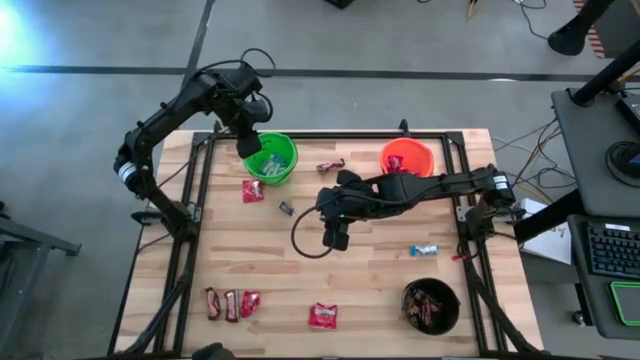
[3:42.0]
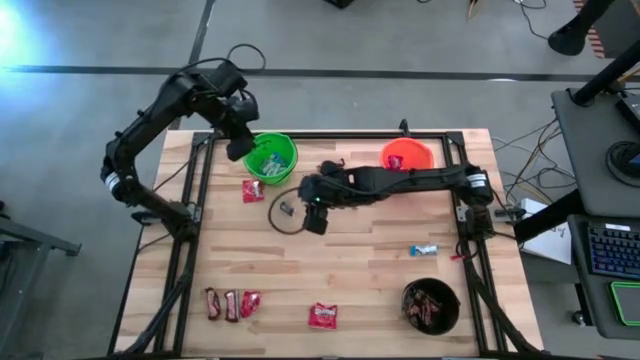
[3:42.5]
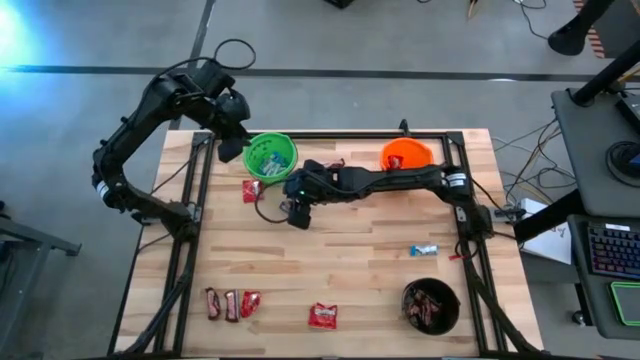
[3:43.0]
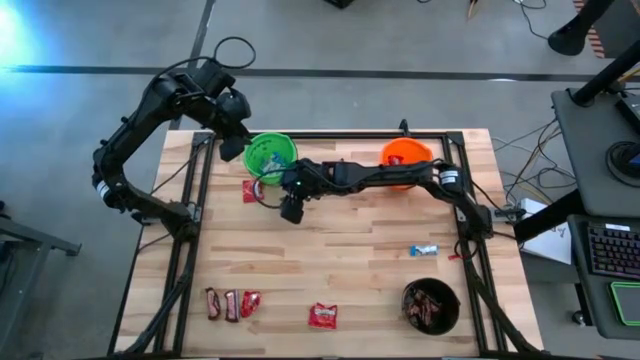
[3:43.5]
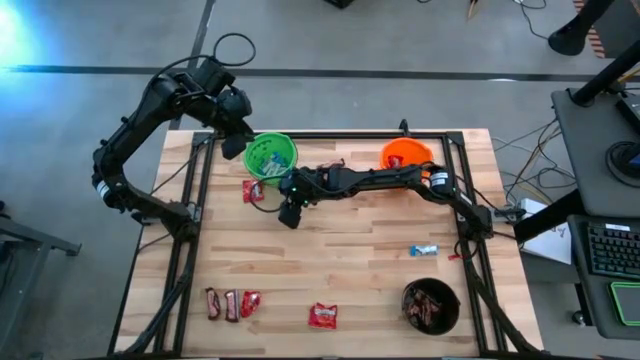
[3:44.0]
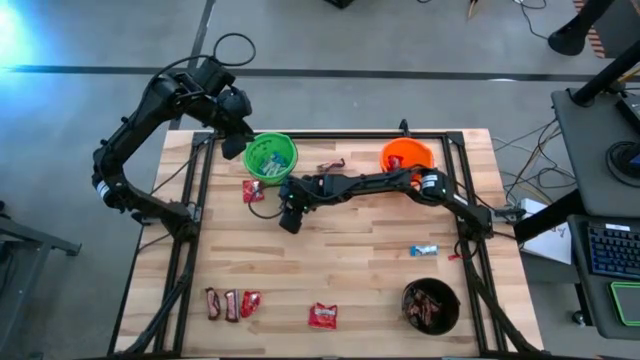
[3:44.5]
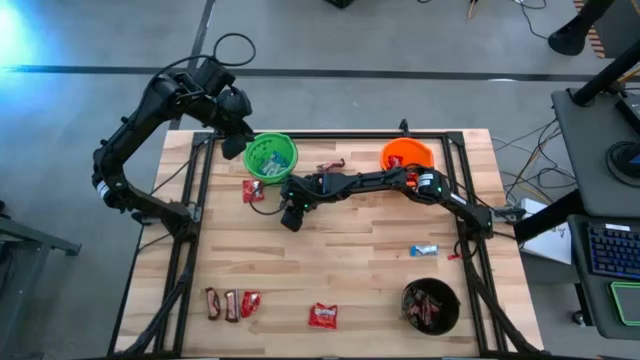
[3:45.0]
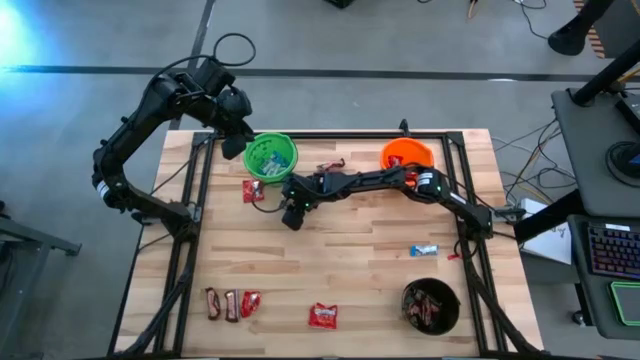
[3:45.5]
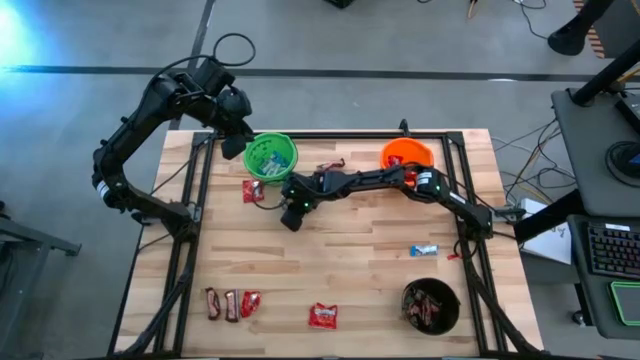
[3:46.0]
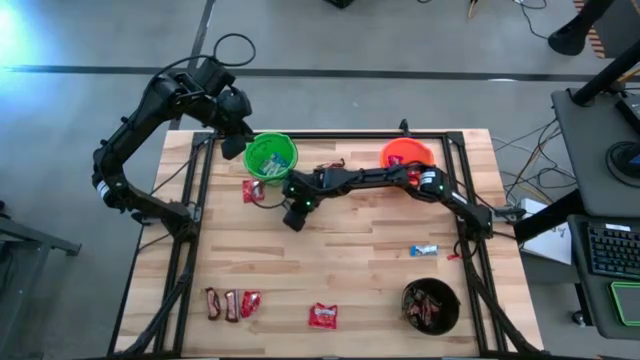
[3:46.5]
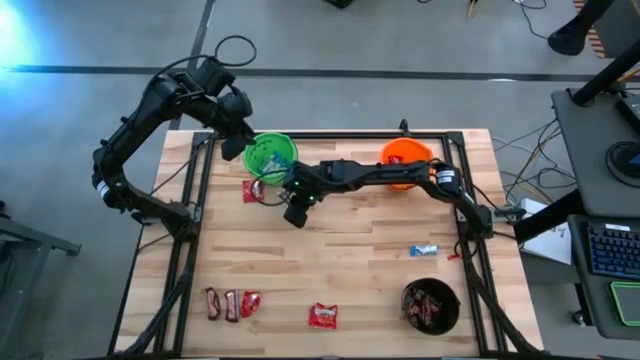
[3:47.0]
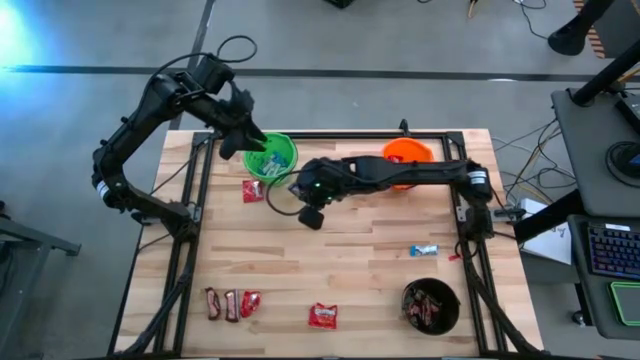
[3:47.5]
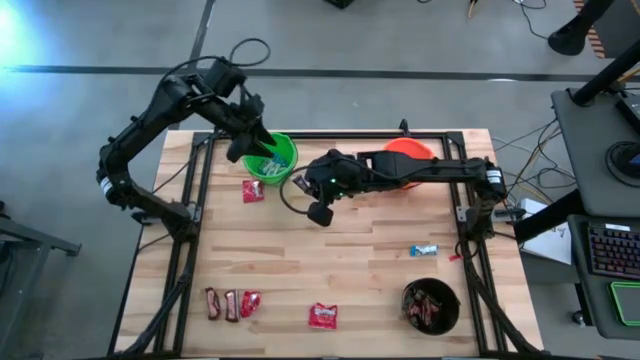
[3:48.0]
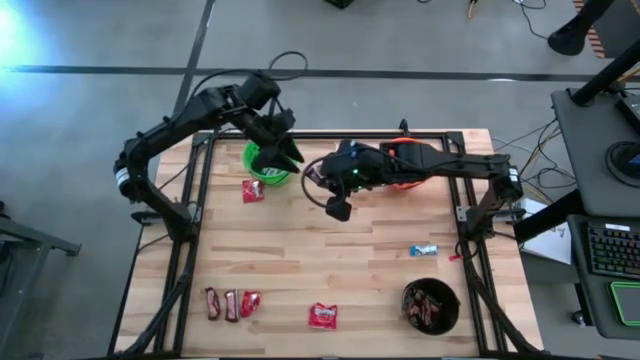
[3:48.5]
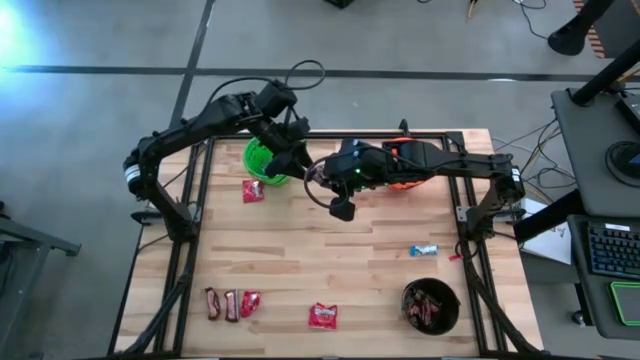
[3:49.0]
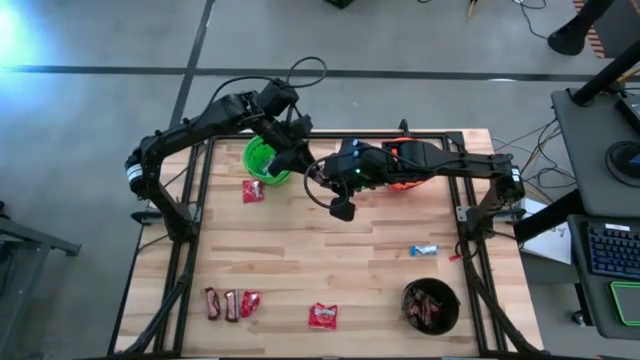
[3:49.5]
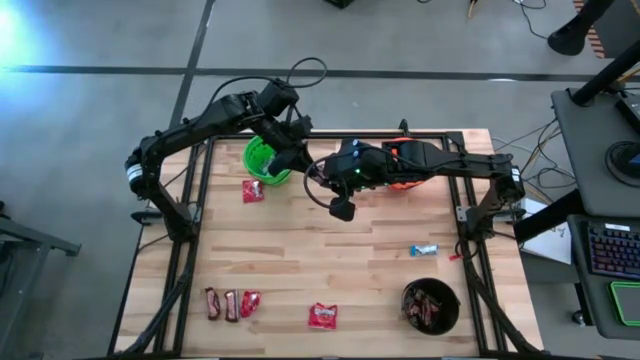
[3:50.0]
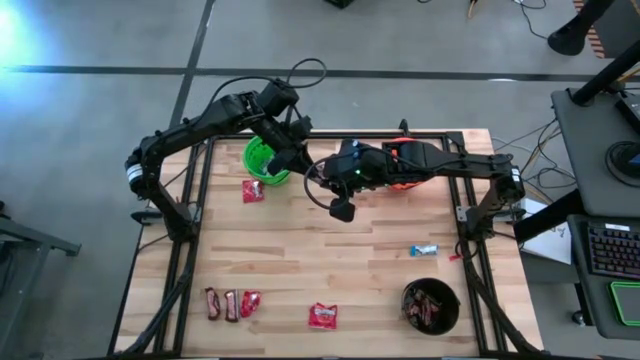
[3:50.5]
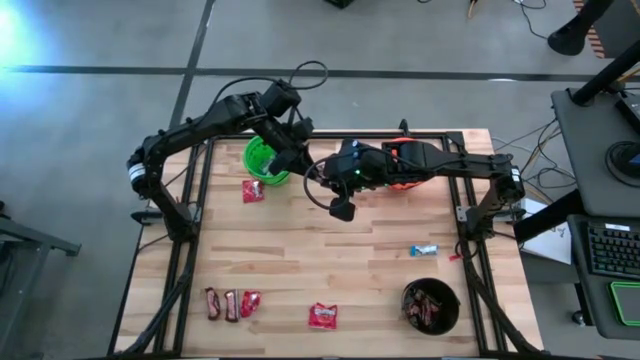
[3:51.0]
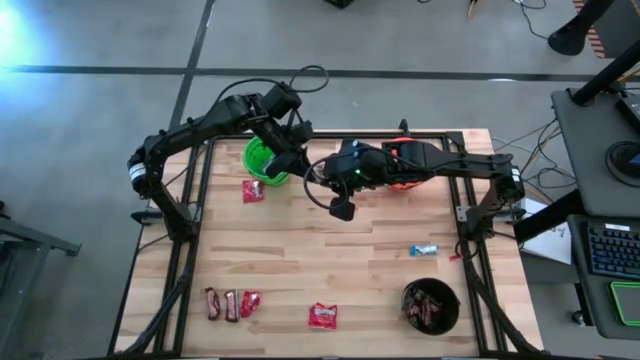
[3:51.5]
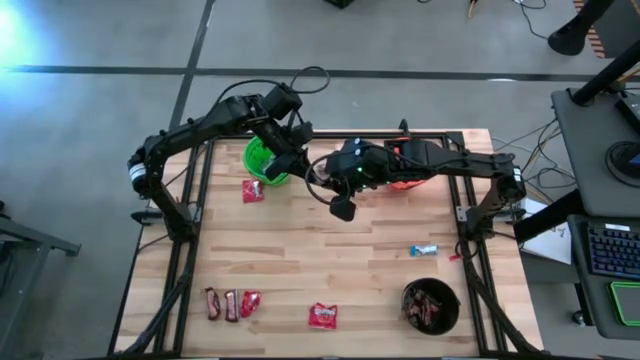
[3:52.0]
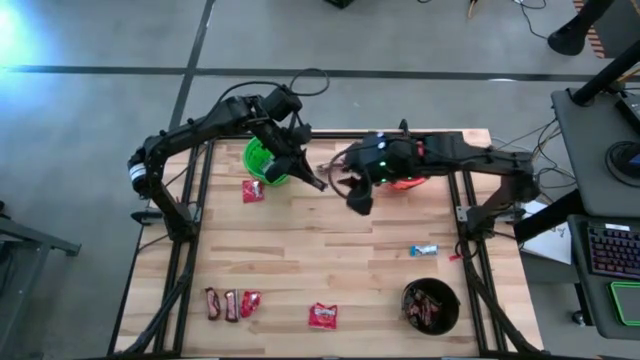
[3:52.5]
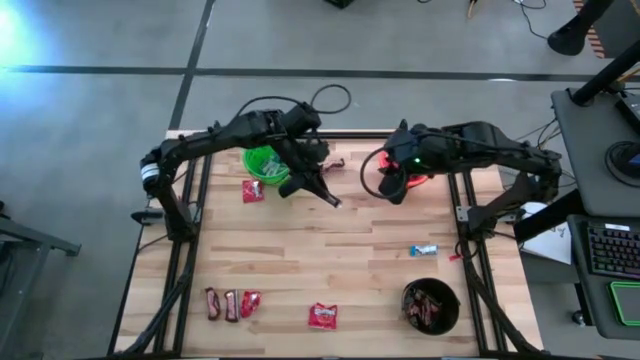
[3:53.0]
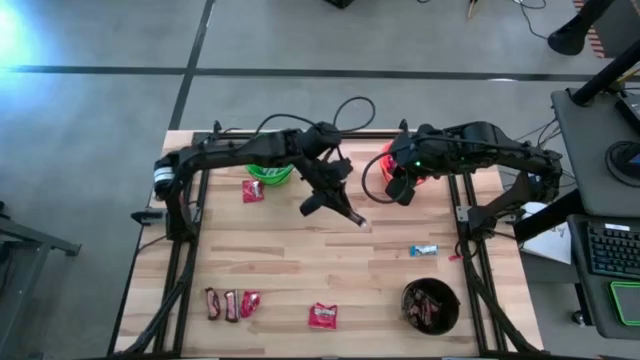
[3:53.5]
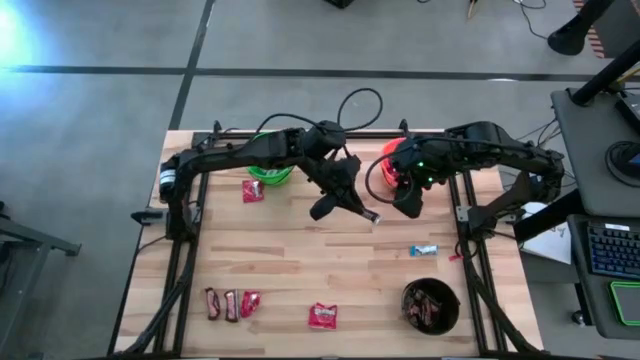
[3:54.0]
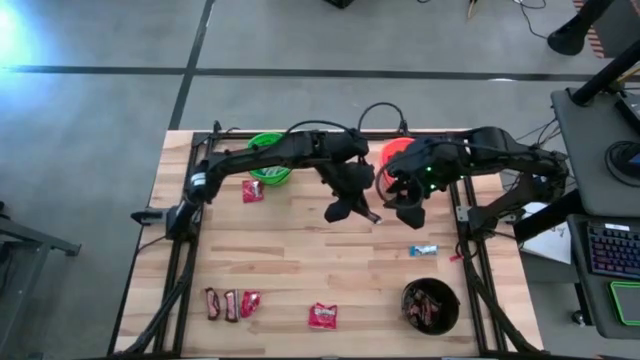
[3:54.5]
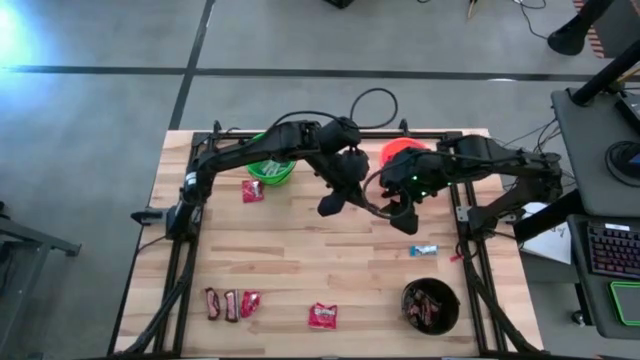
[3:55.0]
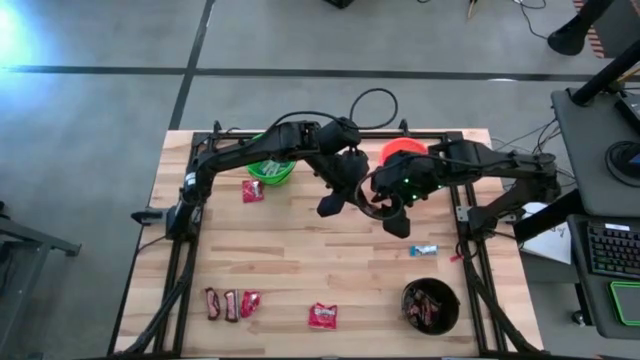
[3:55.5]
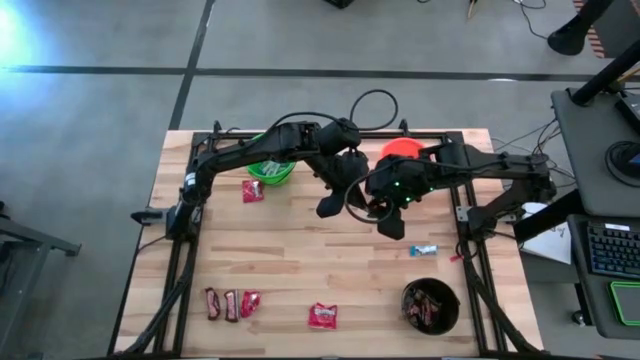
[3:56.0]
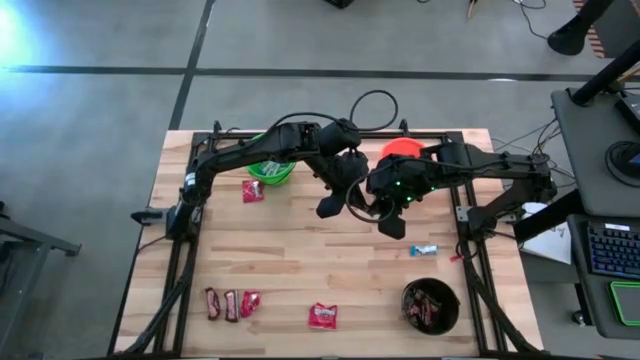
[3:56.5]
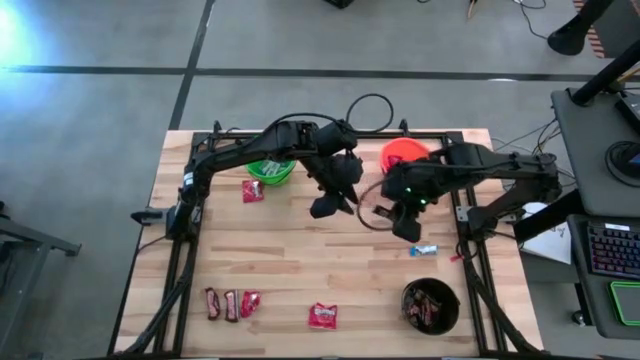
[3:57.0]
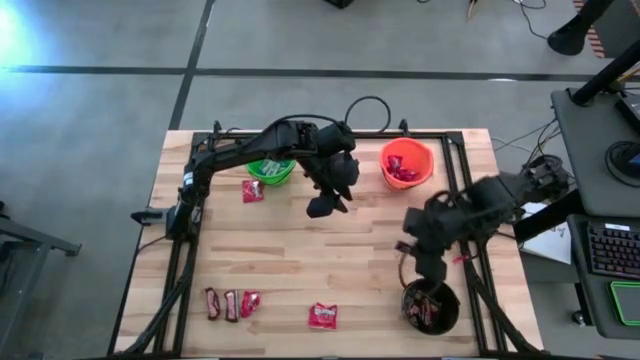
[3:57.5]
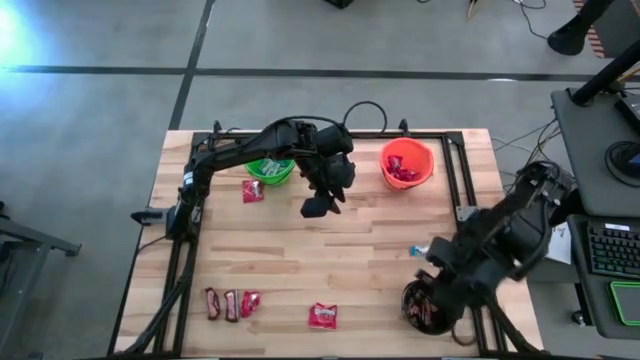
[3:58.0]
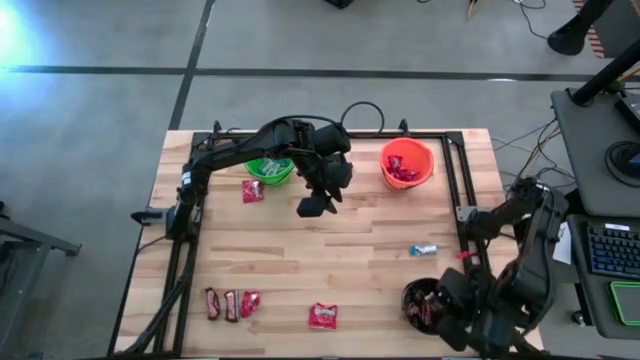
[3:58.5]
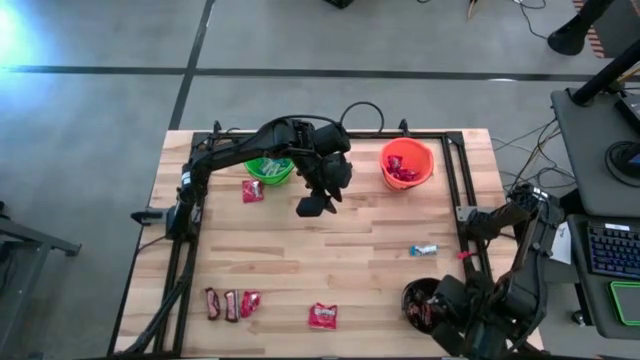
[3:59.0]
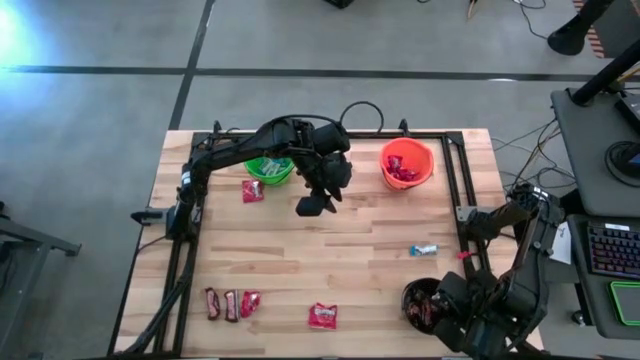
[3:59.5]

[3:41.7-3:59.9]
Task: Sort candy
Put the brown candy into the black bucket

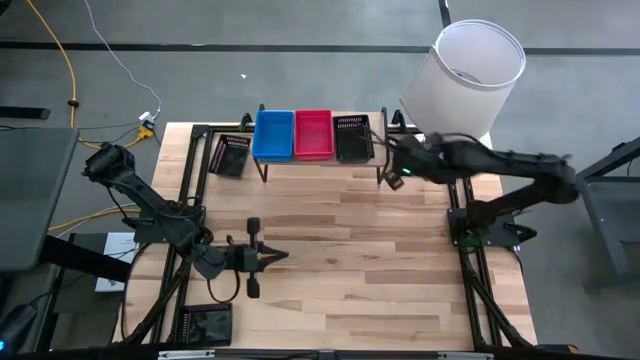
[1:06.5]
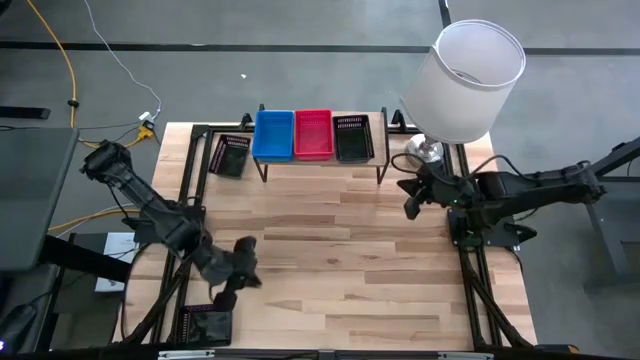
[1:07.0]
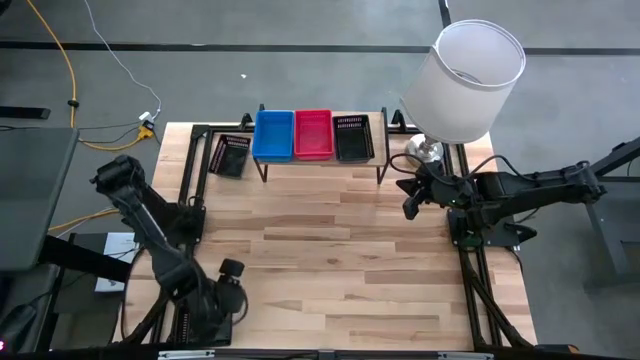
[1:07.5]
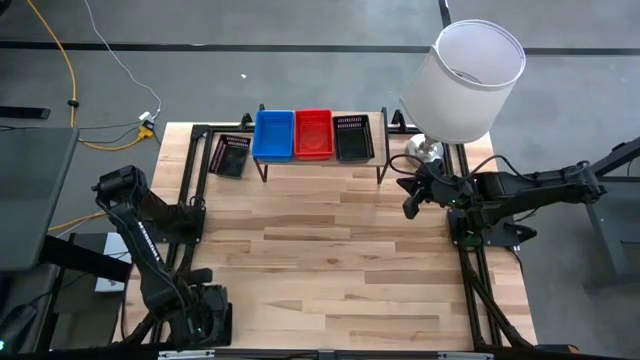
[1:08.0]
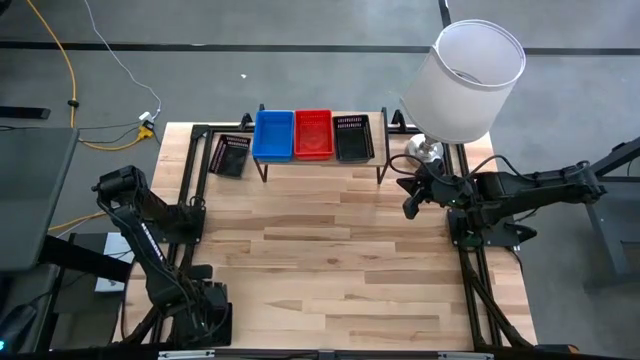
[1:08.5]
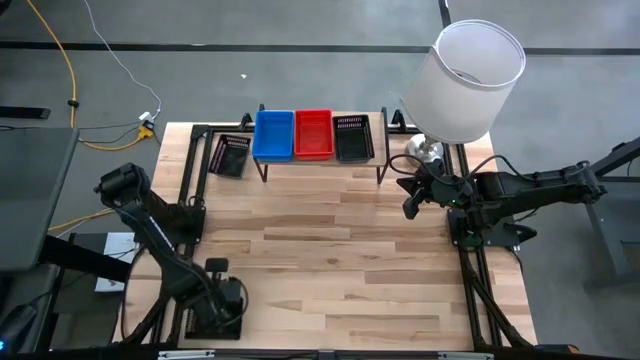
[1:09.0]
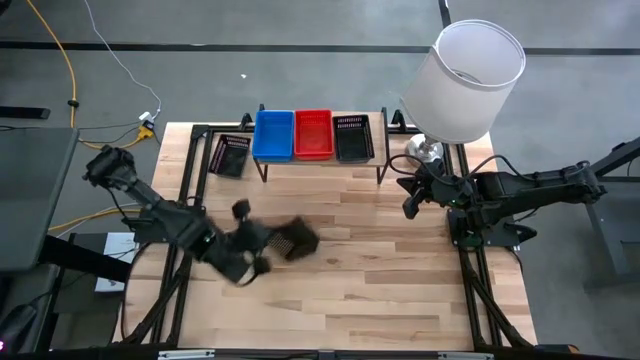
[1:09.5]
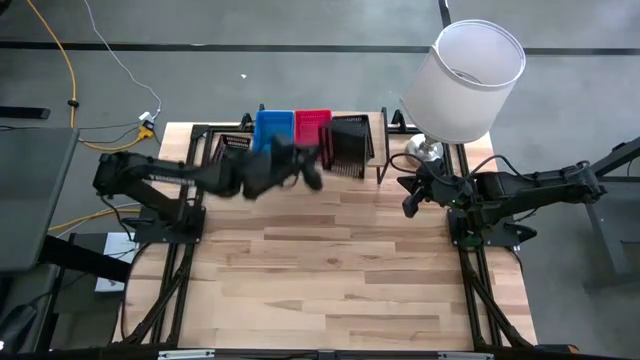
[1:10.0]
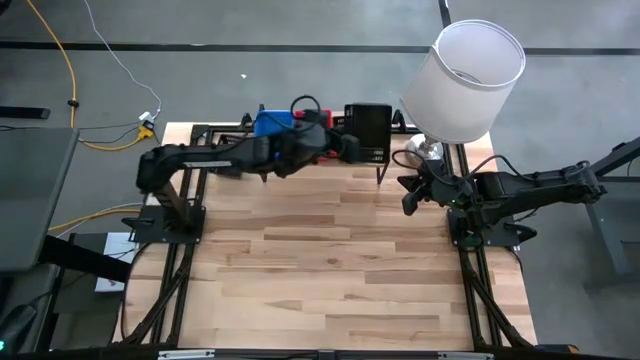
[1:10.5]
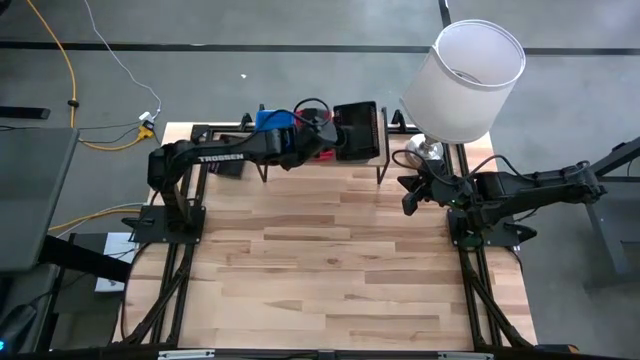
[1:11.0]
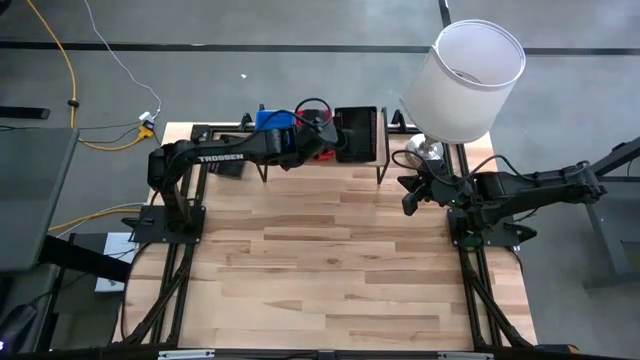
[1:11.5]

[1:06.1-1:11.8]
Task: Stack baskets on shelf by color
Stack the bottom black bin on top of the black bin on the shelf
